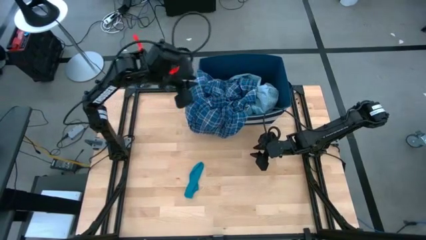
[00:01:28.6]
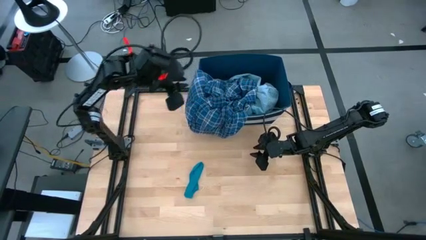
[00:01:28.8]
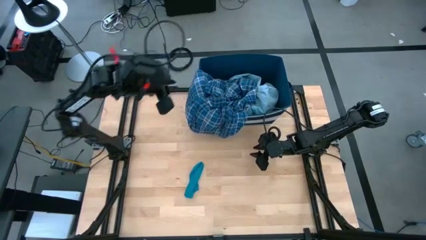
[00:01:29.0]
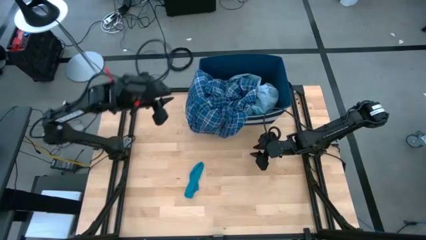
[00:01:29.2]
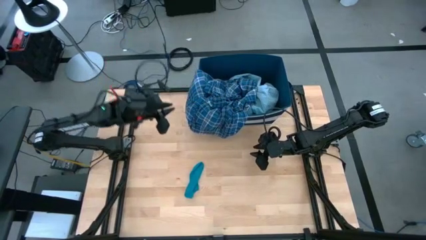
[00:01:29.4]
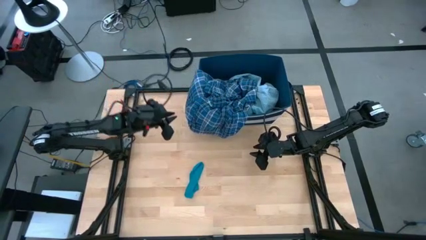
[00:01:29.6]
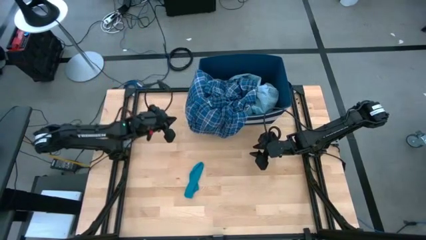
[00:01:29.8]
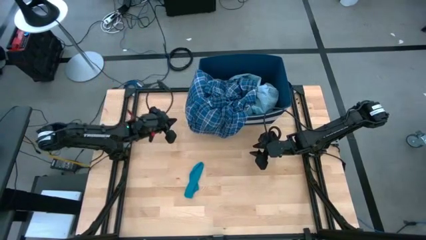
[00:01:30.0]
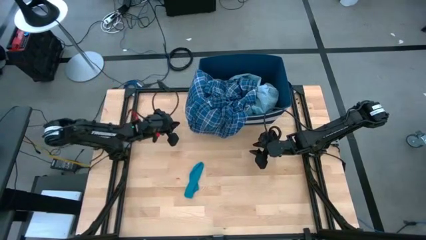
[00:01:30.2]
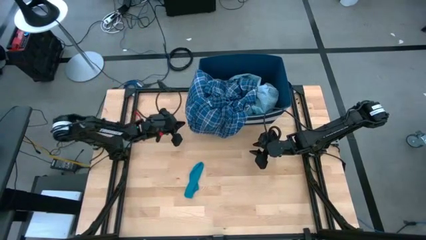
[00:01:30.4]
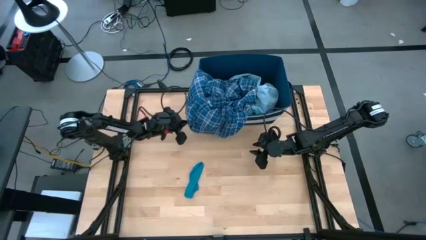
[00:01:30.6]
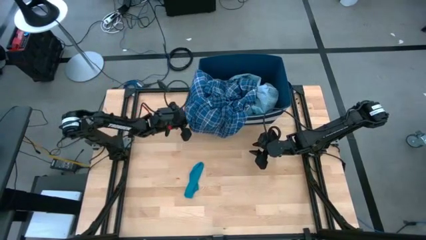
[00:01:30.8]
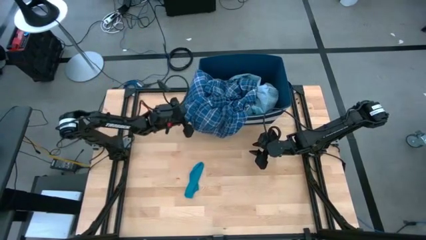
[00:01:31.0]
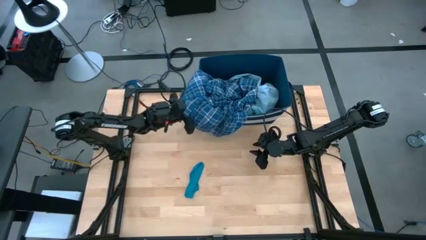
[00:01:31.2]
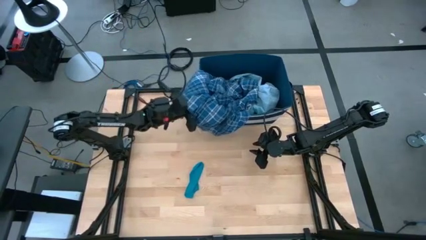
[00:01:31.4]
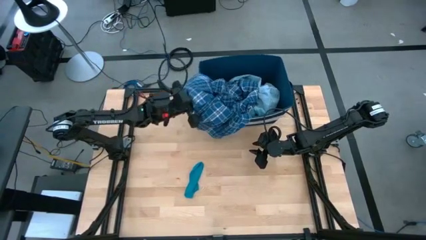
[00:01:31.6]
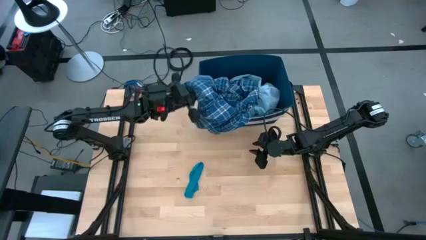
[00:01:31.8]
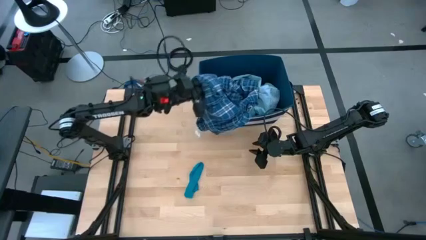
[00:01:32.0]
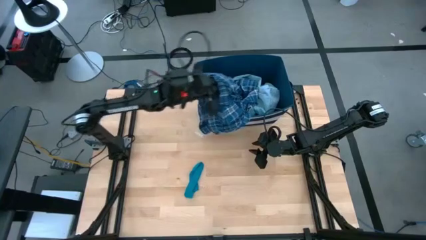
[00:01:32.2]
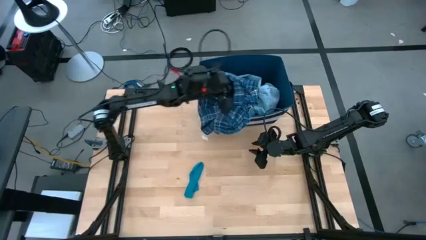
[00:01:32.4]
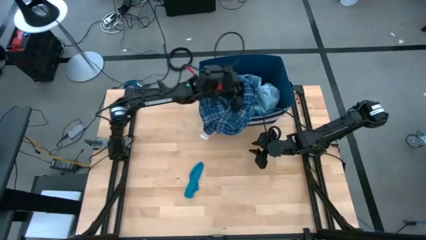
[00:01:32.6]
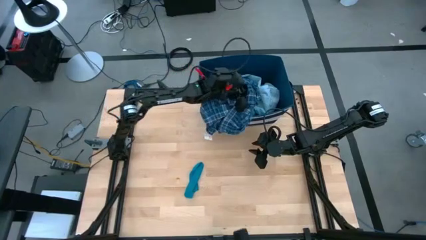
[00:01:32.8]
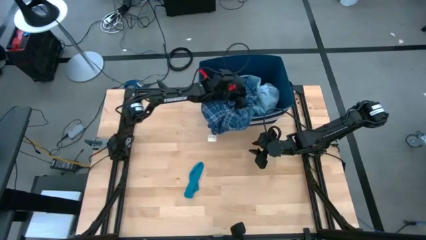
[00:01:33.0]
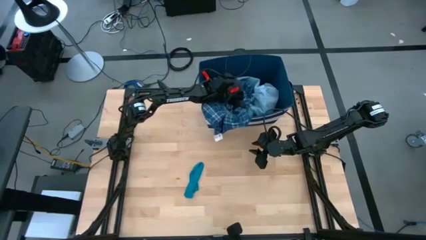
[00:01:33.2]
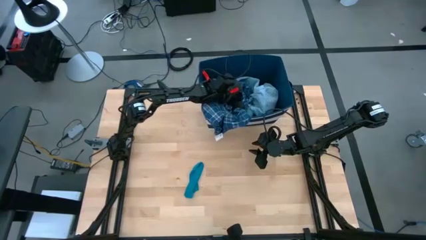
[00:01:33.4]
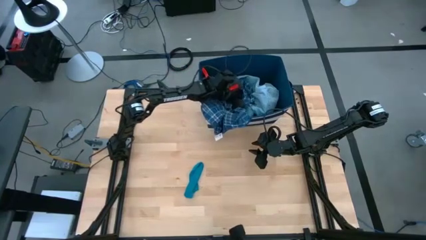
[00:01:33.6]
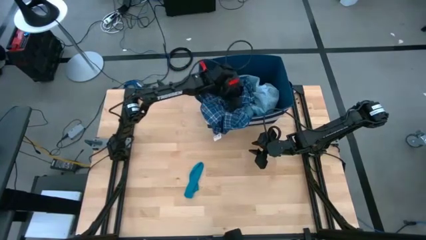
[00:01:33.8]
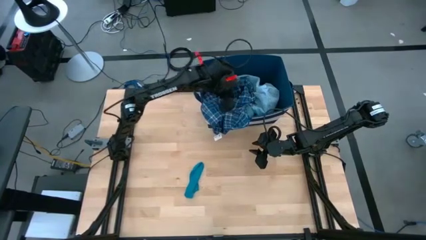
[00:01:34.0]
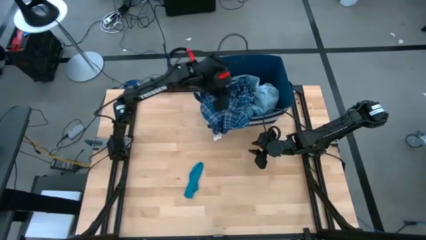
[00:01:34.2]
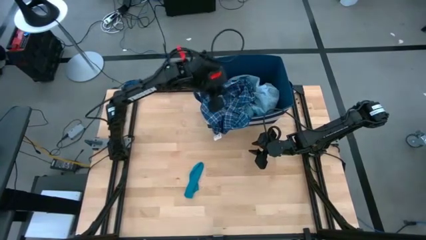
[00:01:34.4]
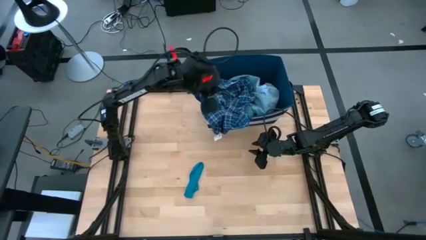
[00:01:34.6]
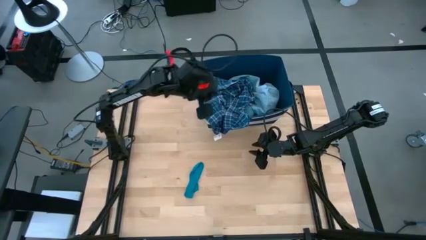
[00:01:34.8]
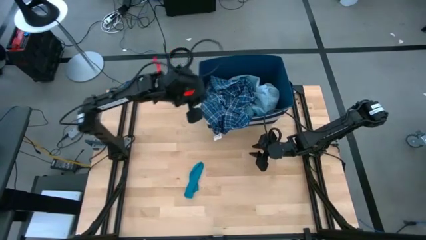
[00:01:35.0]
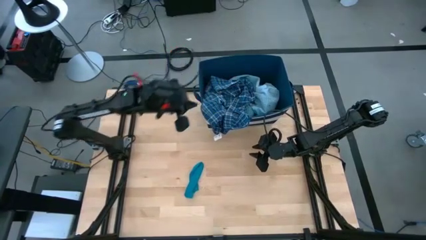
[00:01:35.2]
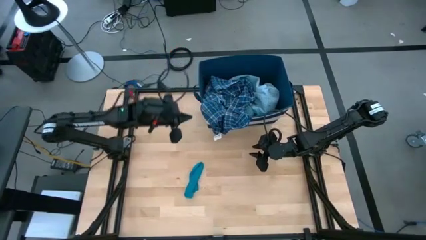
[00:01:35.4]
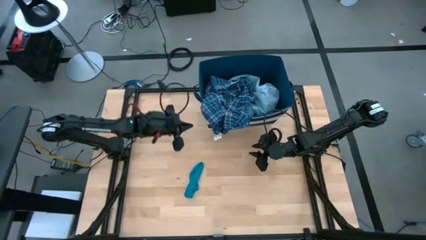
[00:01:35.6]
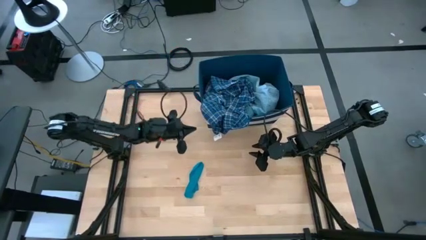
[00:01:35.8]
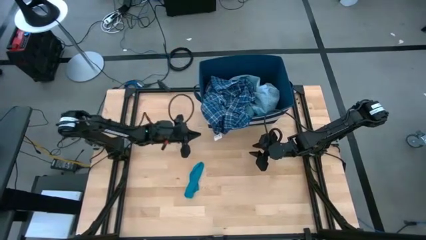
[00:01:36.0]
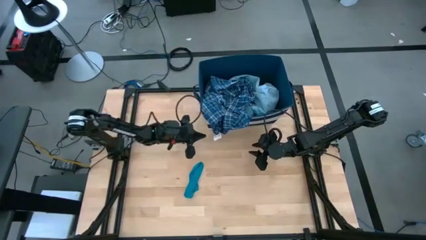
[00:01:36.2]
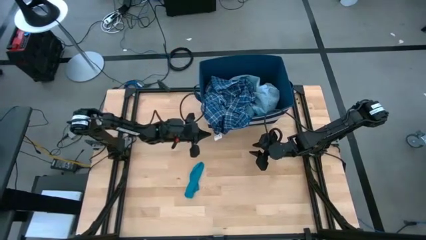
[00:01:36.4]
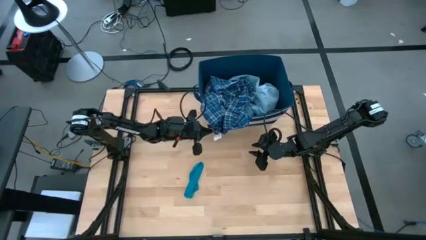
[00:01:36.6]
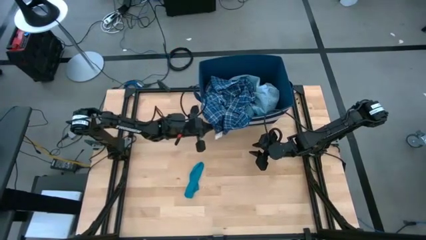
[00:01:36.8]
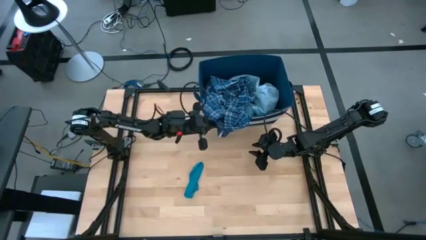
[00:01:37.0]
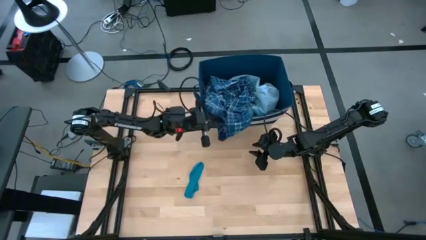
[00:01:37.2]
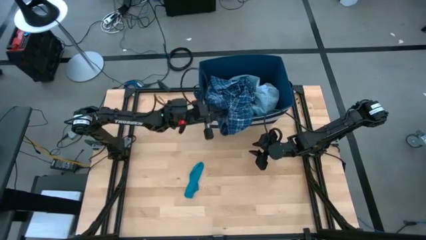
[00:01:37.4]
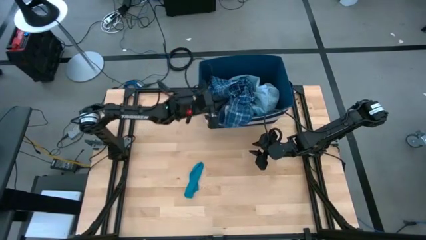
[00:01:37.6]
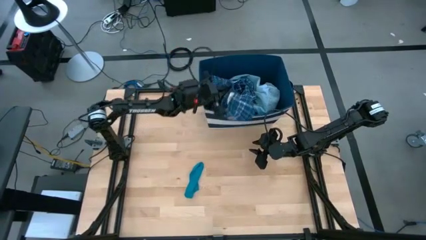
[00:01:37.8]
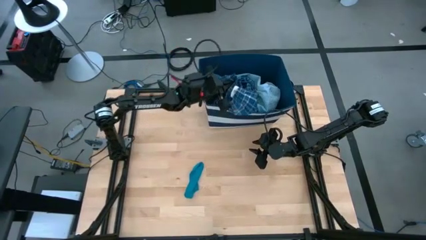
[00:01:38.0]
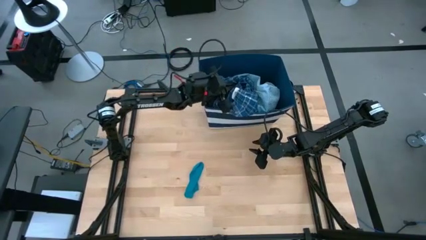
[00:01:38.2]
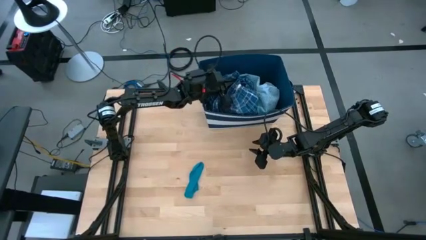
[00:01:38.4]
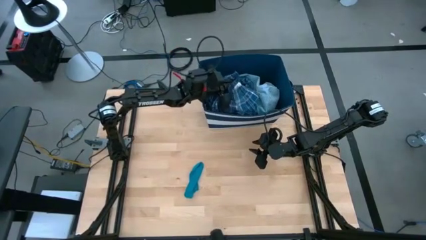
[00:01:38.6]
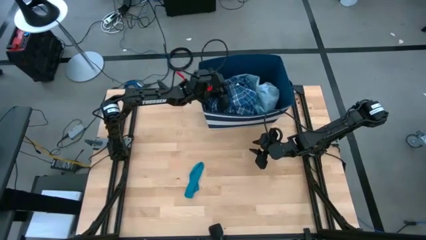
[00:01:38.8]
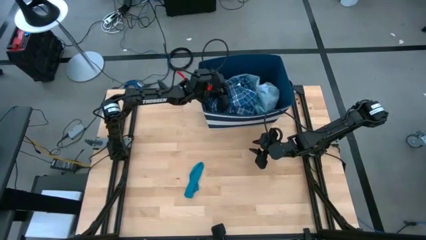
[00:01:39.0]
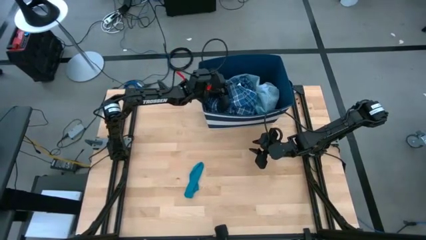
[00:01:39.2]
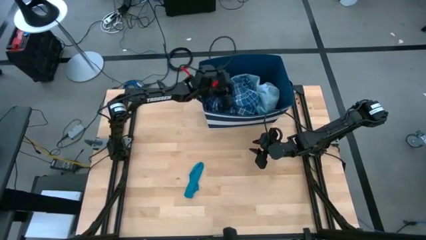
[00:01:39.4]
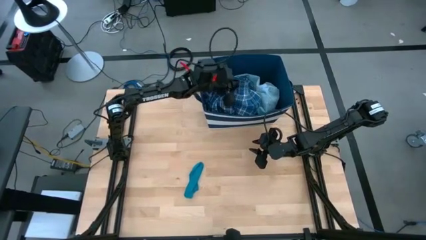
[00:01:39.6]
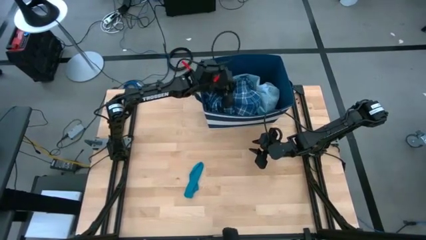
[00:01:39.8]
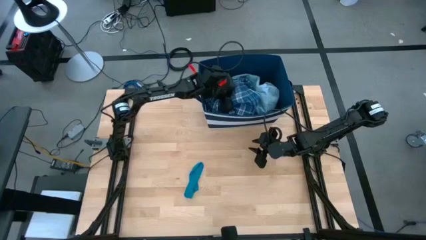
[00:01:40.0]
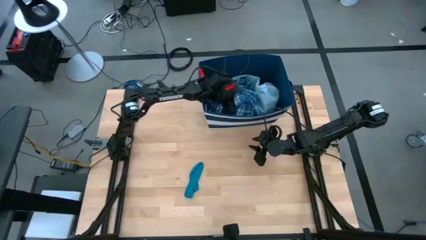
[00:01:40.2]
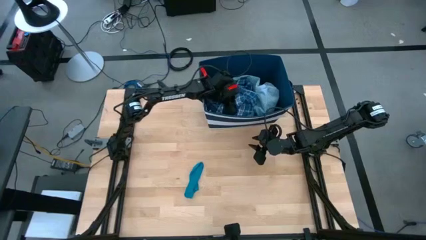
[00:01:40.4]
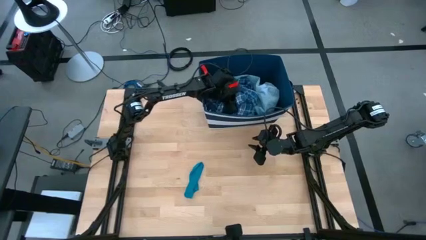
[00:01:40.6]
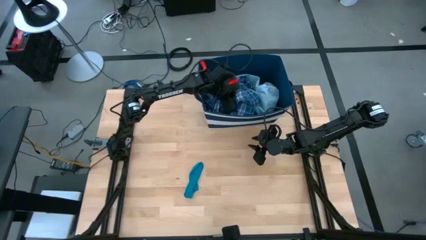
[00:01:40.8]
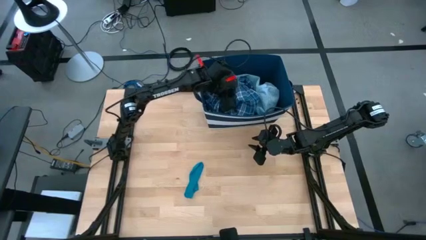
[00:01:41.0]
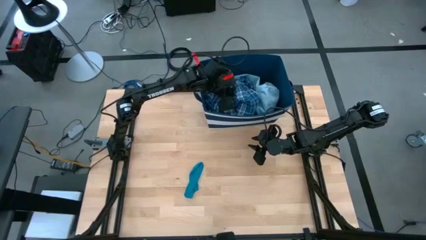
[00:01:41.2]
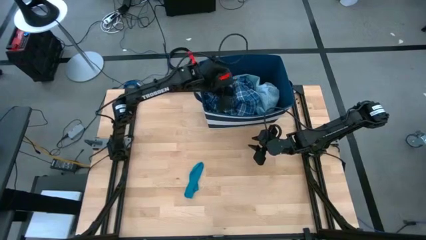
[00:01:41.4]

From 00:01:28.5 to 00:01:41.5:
Task: Sort clothes
Put the blue shirt into the blue laundry bin

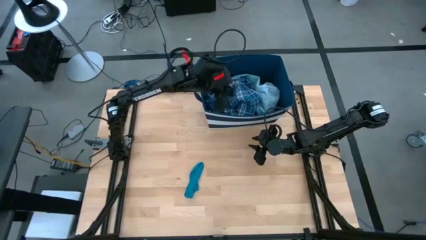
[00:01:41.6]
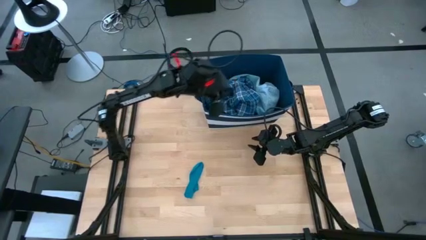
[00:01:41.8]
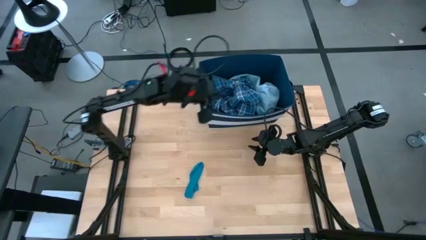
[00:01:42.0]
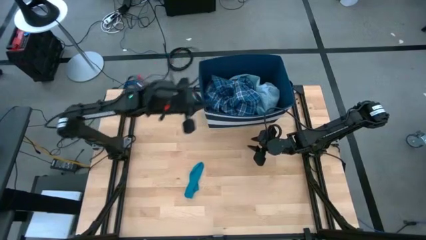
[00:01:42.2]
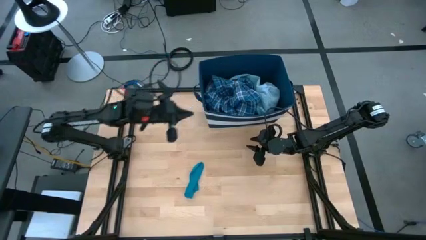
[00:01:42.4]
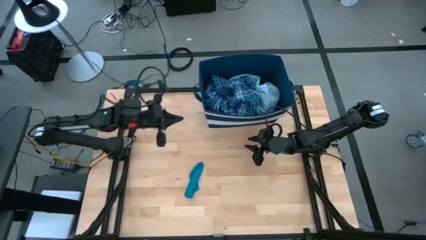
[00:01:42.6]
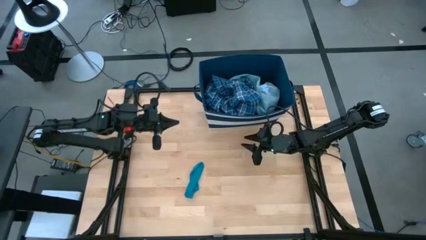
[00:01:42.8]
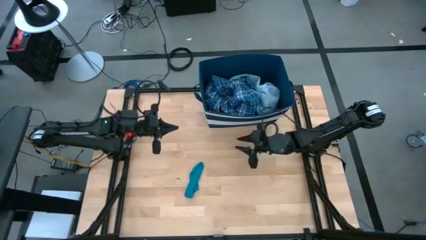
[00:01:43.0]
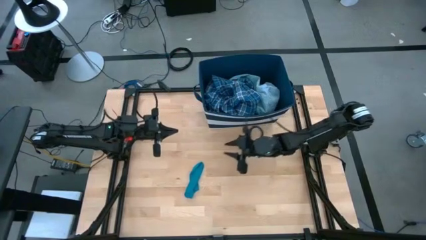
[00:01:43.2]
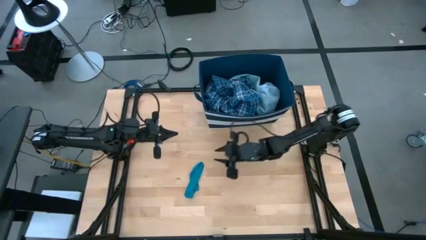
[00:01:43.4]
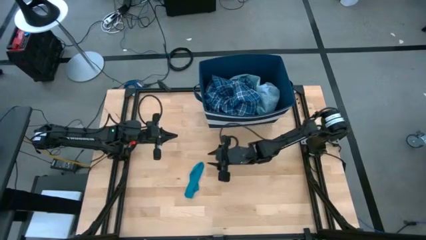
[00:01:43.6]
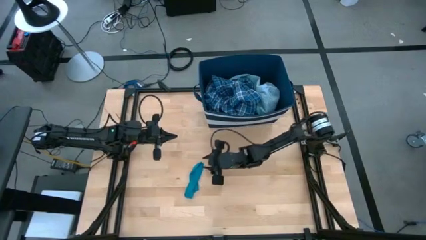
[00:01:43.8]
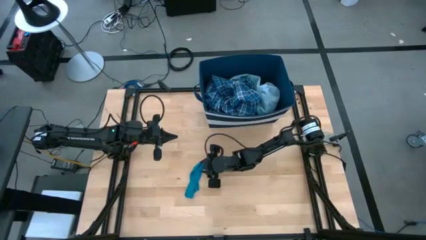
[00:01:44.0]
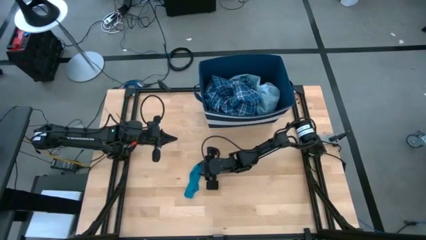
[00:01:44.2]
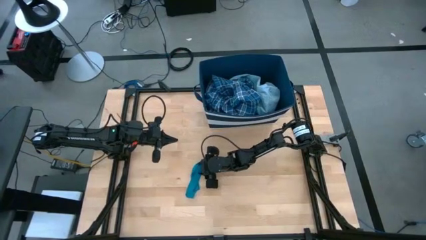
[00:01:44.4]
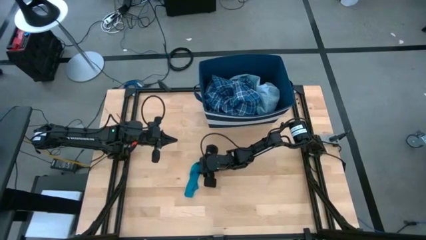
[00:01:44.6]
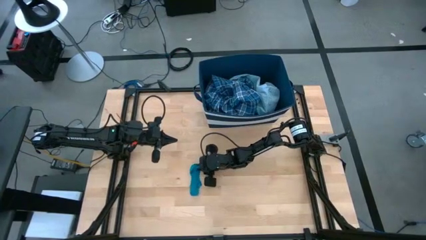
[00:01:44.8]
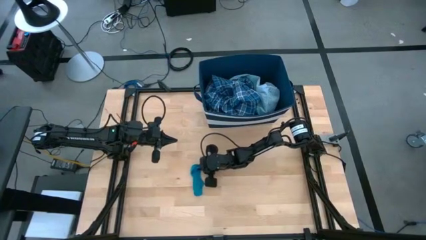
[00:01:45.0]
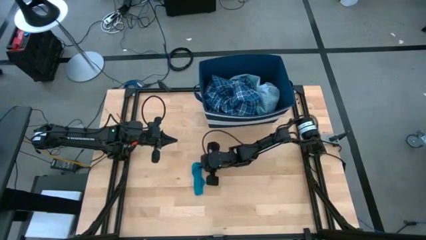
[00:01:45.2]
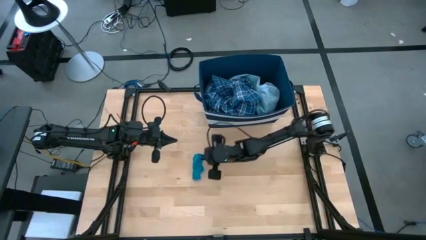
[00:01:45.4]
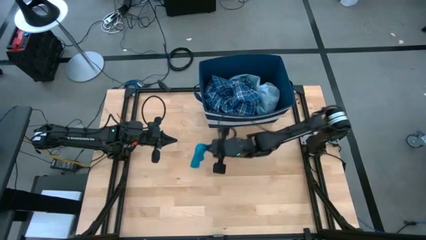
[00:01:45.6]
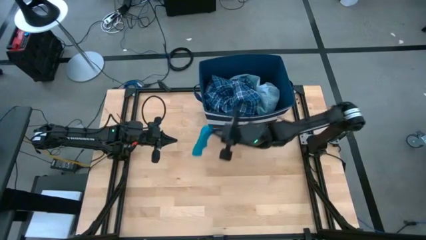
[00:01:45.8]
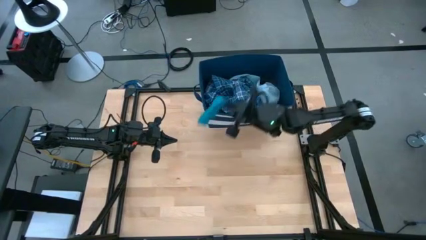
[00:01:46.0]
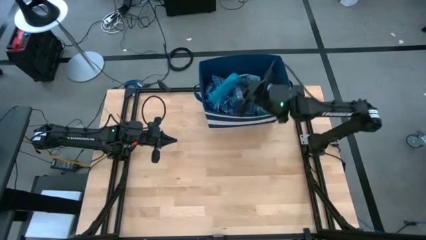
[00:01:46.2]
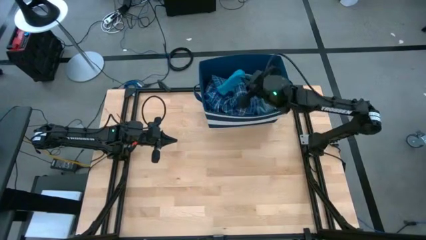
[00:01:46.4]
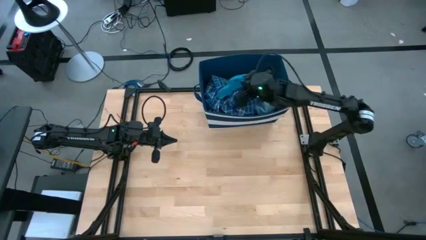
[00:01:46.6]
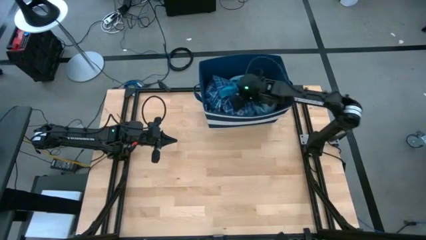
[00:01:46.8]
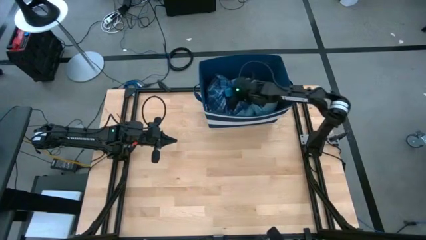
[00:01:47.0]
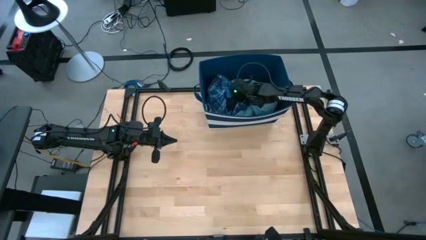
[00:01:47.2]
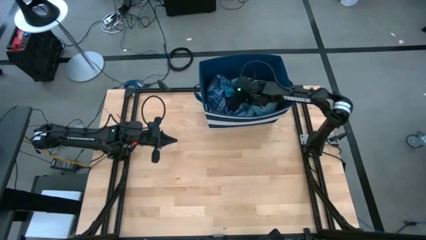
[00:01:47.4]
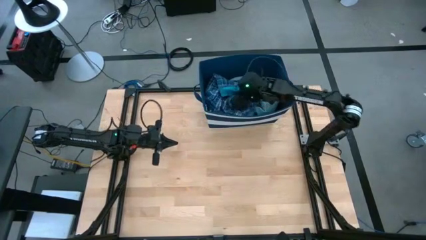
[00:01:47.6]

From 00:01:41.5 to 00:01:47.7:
Put the blue sock into the blue laundry bin
